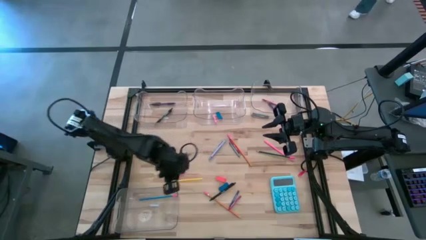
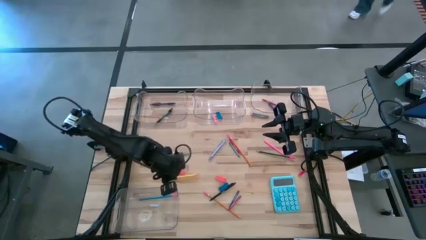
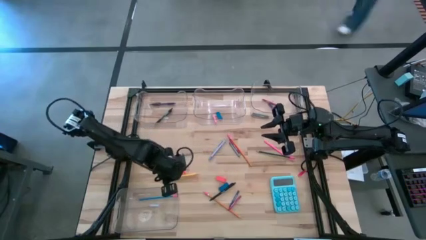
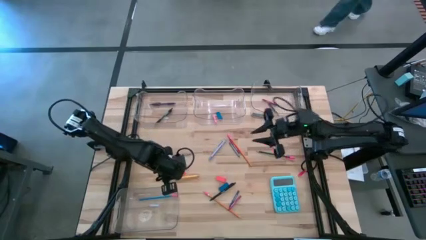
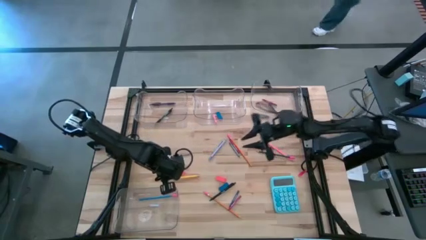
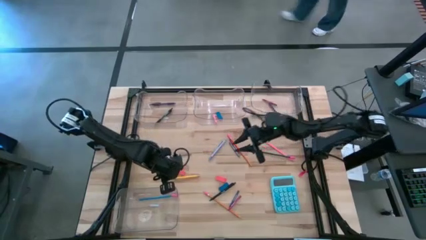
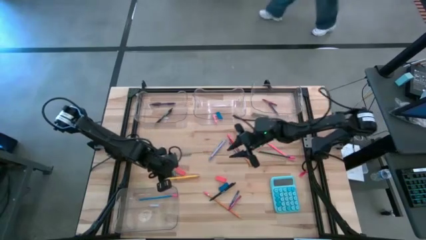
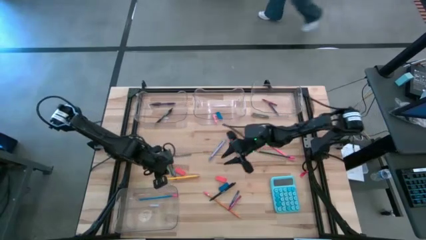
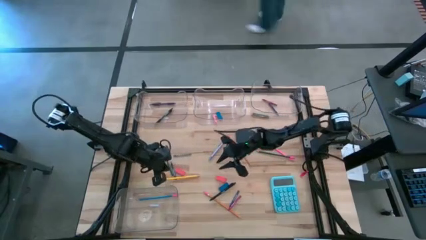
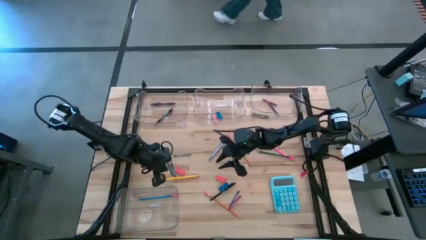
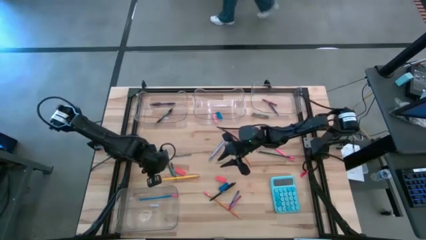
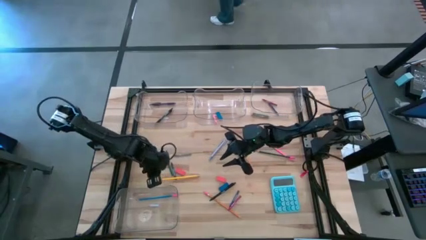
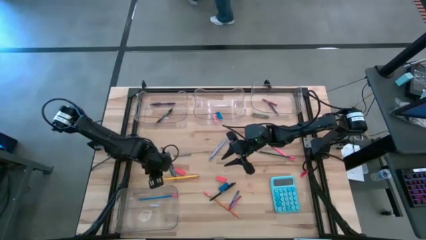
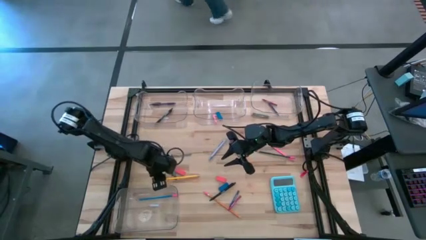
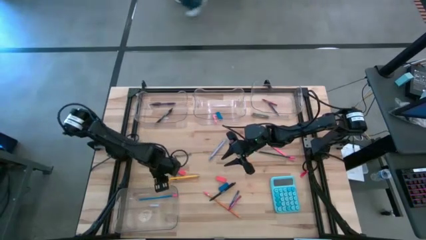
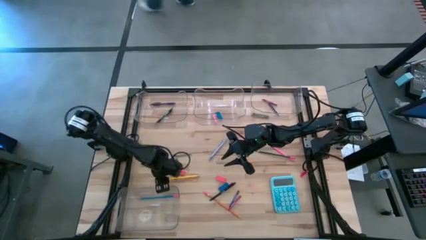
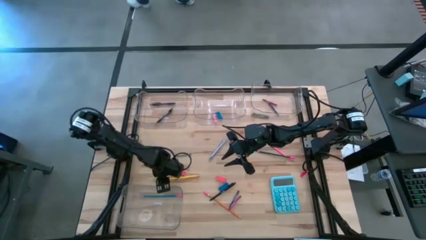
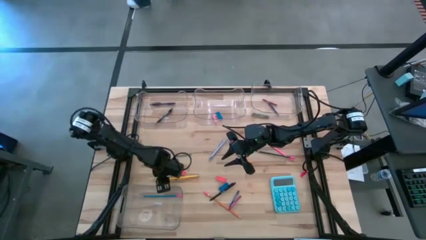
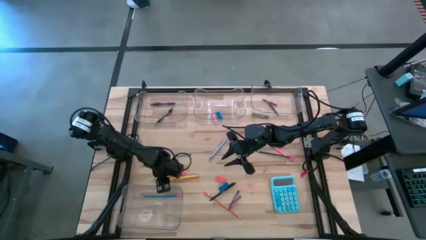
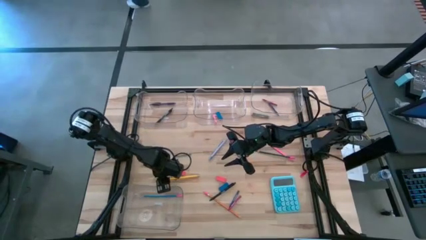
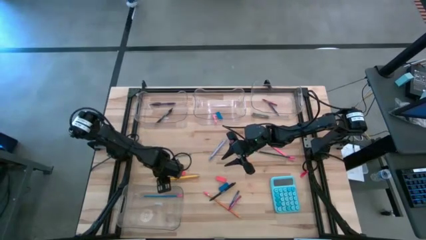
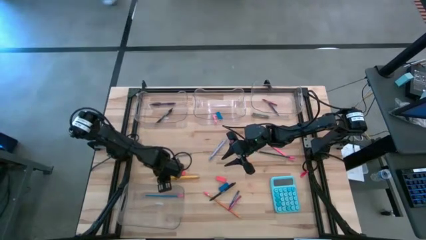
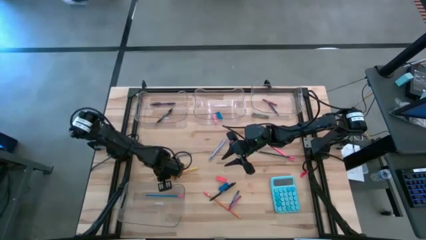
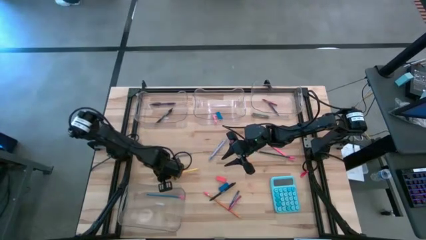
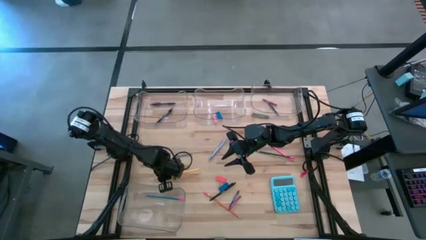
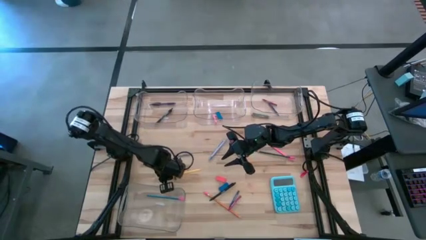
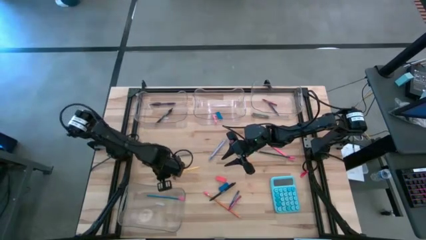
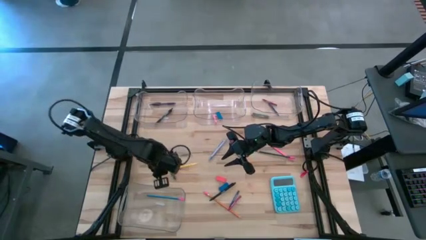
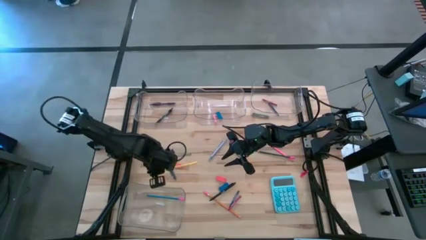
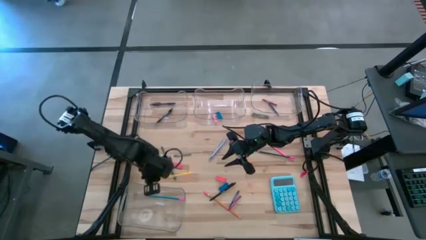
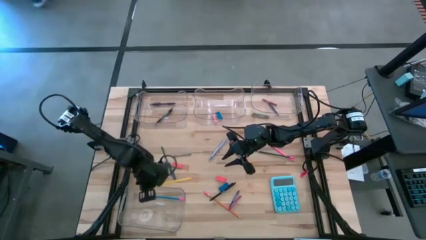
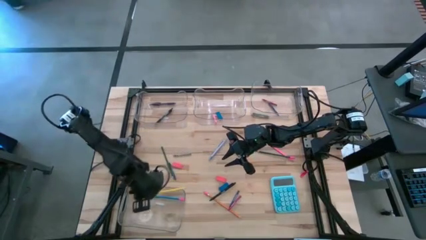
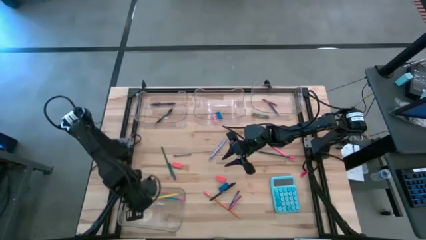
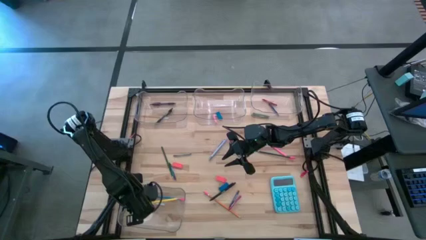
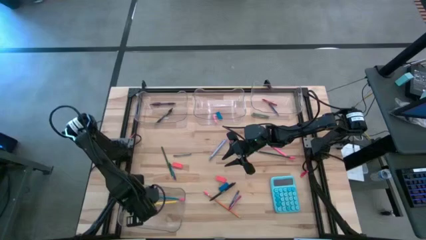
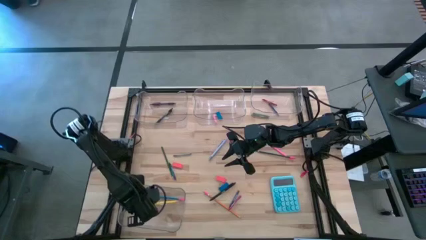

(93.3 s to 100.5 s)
Task: Sort crayons/erasers/pens/pencils in bins
Put the yellow pencil into the bottom transparent bin

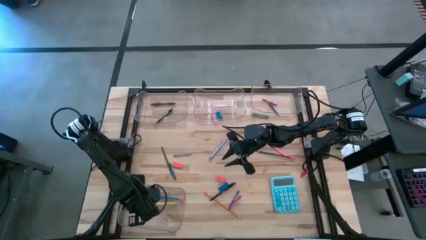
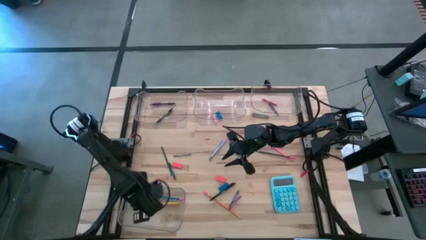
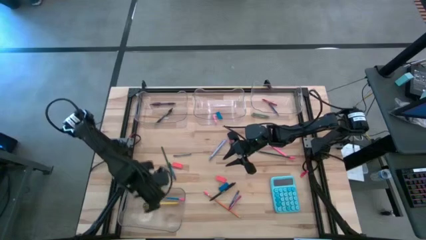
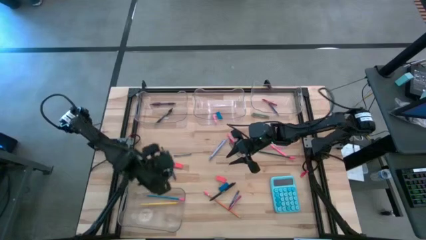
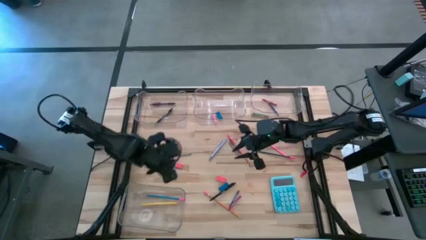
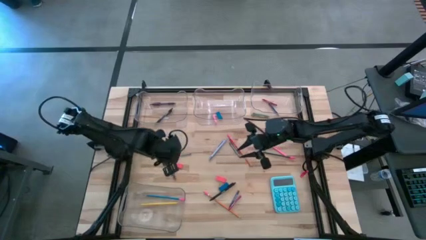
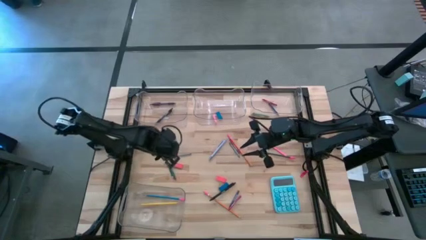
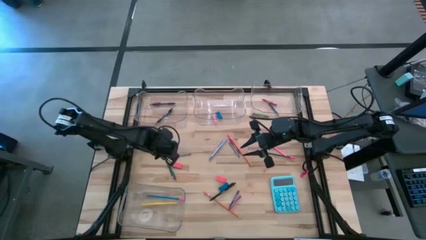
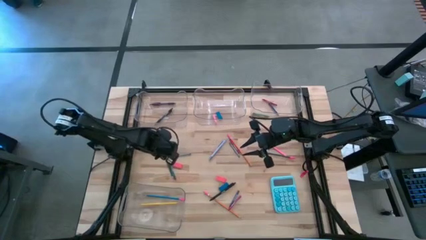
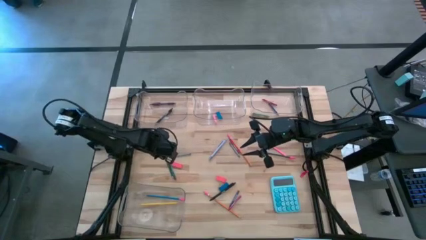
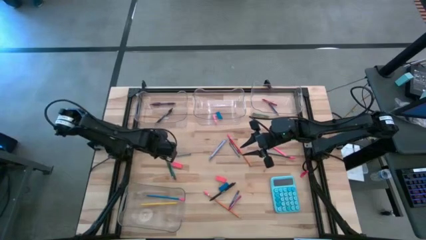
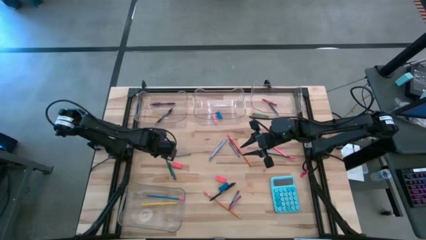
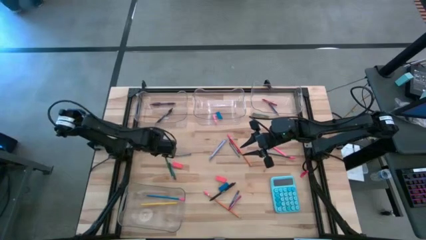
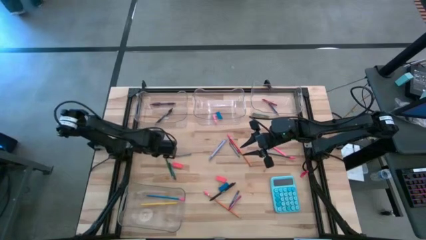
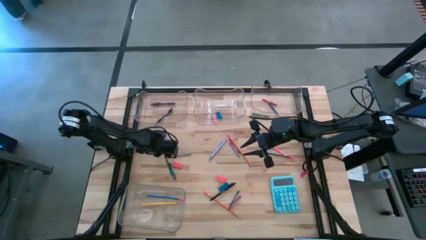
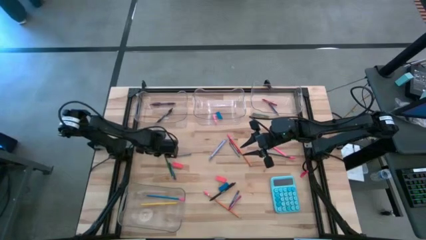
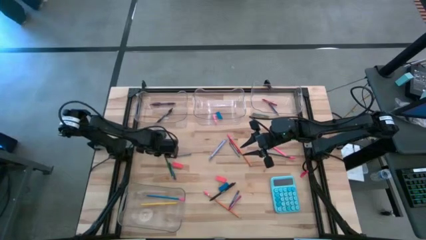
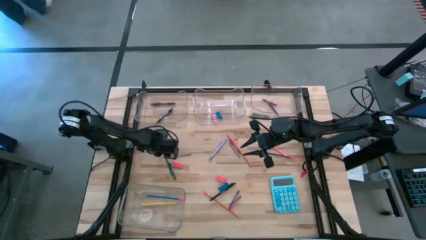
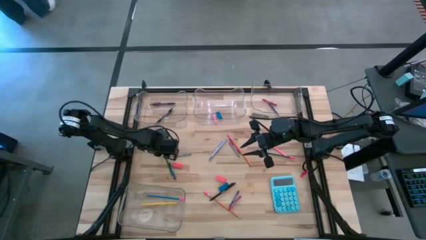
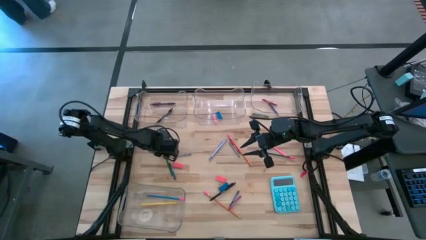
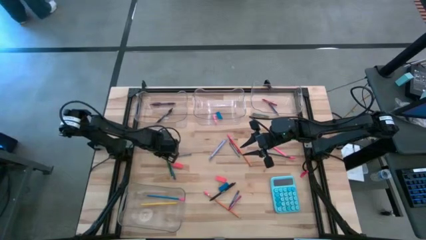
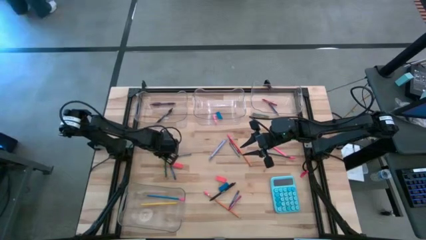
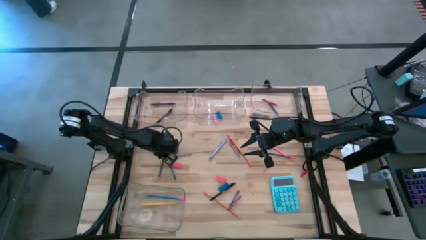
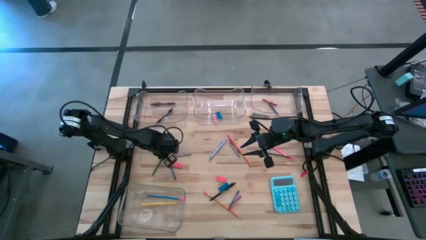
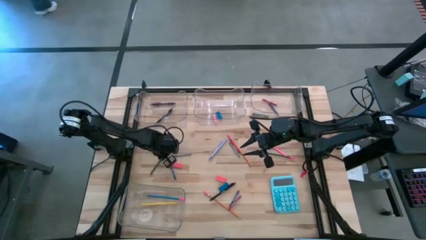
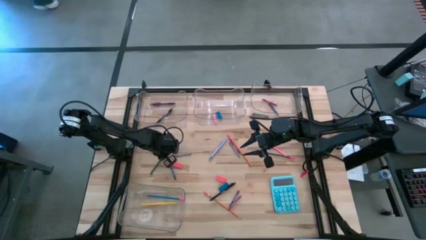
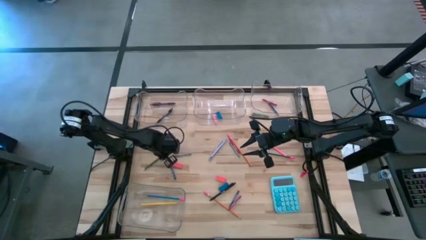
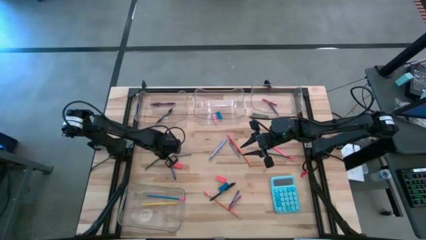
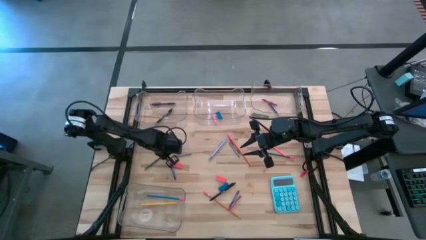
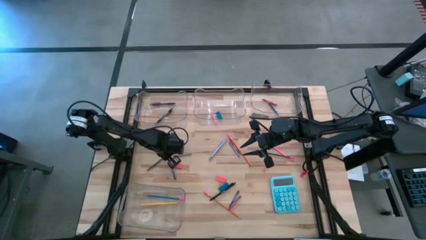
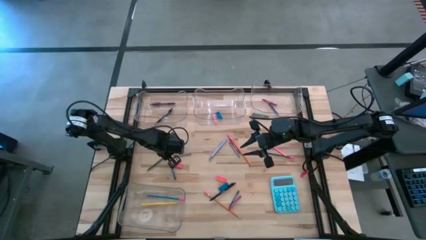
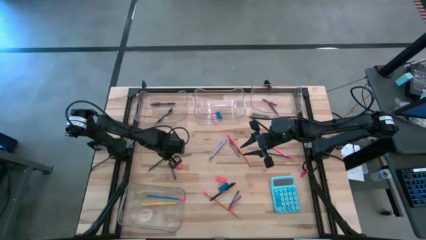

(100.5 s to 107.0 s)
Put the green pencil into the bottom transparent bin

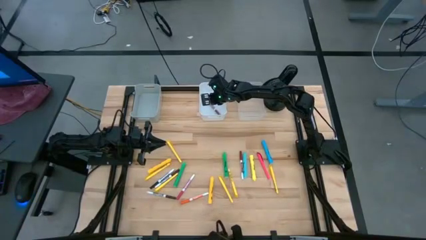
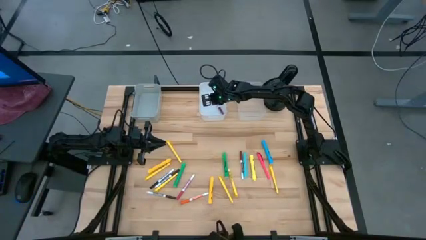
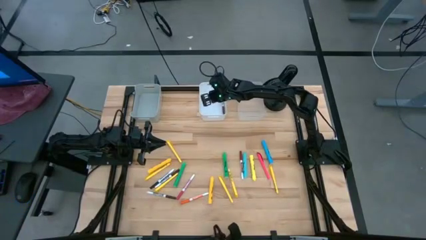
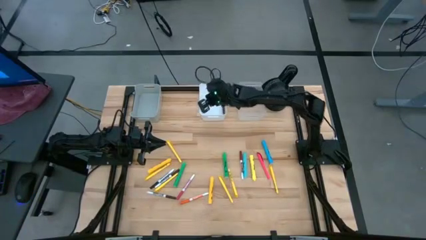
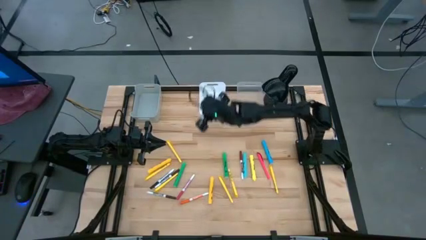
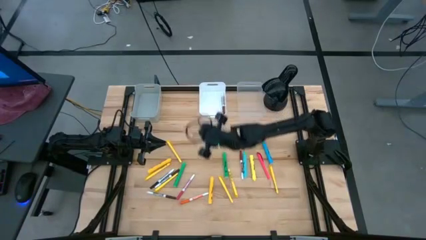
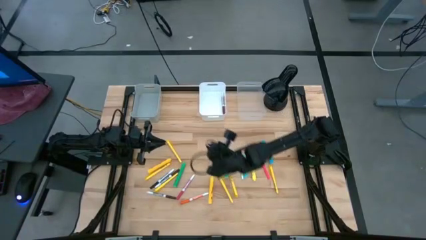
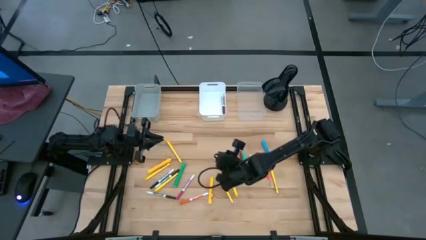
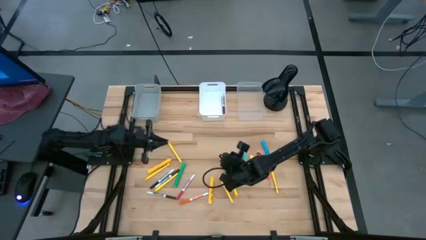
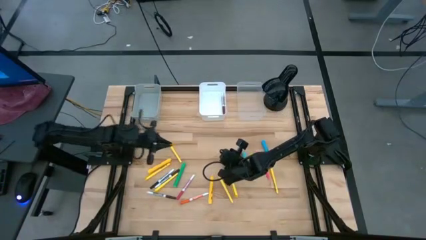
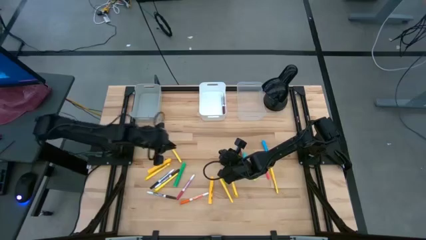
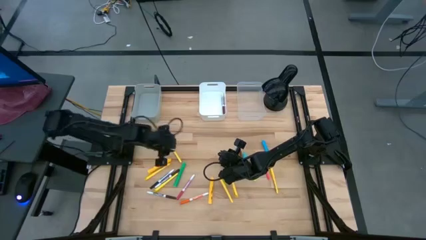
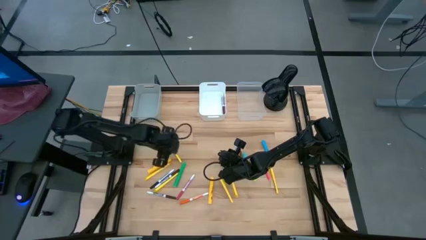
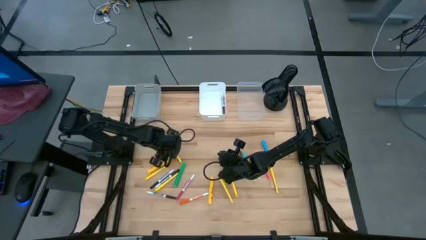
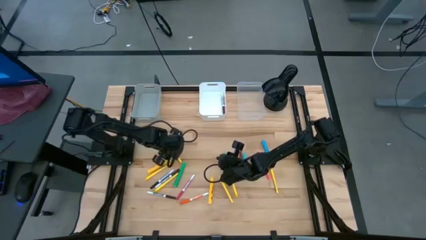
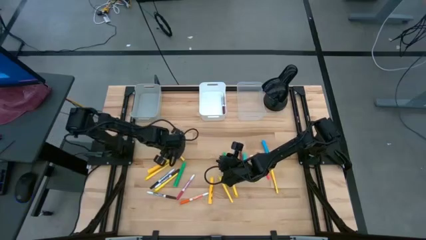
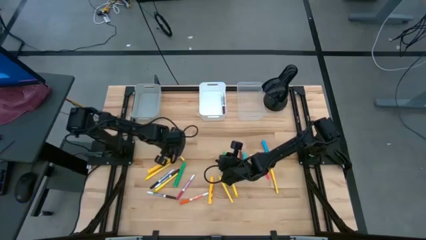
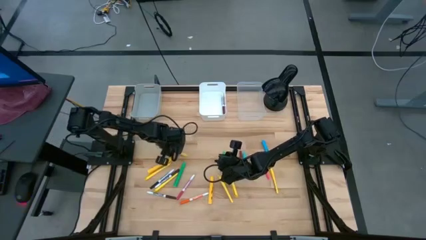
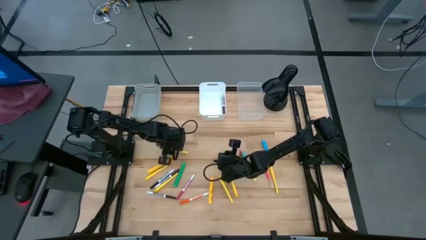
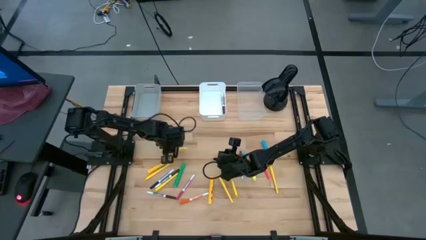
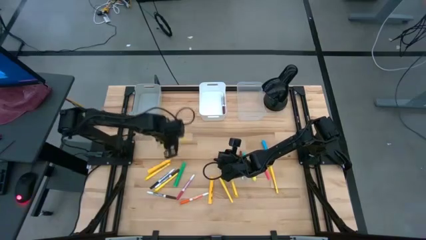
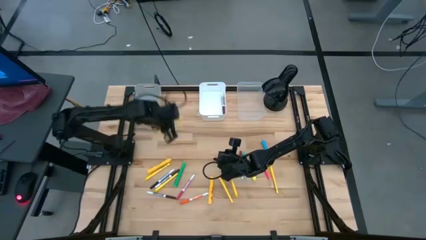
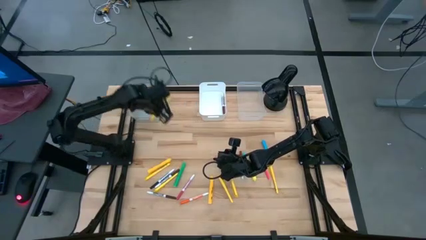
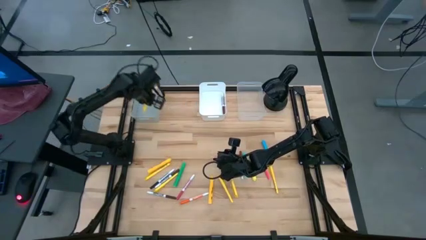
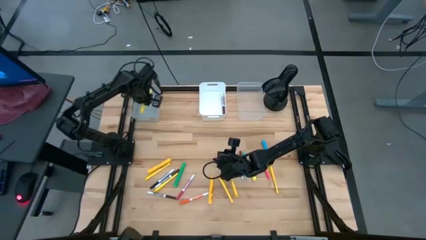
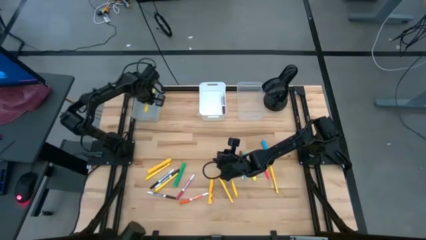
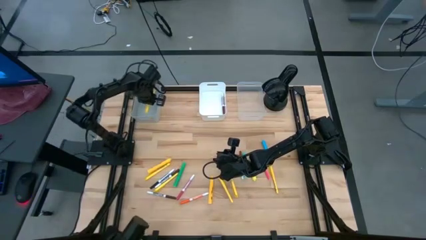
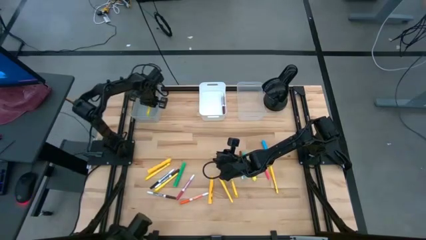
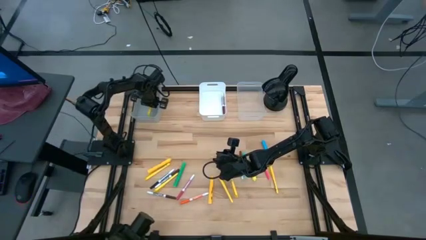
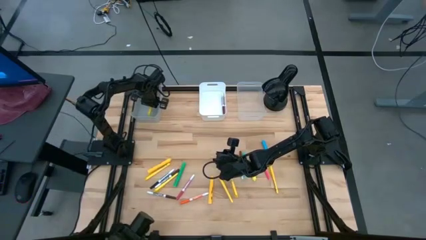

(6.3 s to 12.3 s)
Task: Pick & Place Markers
Put the yellow marker into the gray bin
